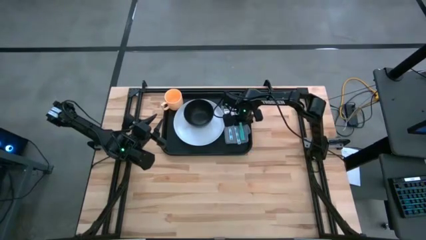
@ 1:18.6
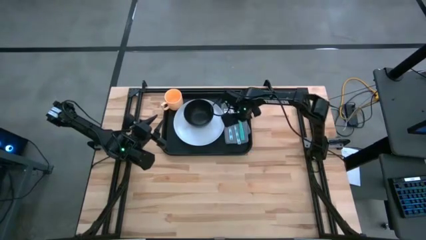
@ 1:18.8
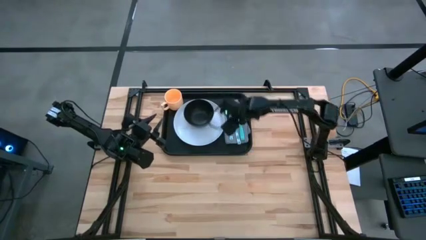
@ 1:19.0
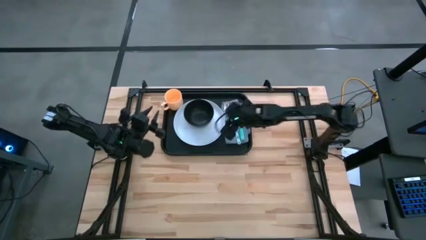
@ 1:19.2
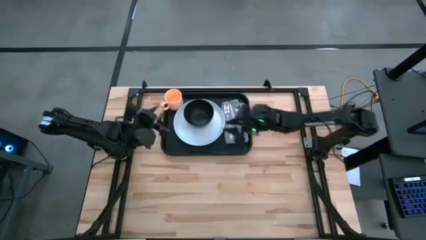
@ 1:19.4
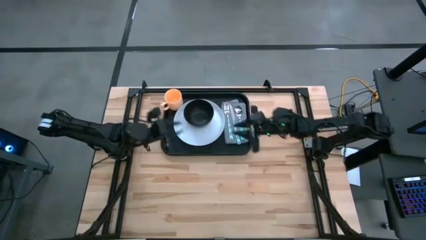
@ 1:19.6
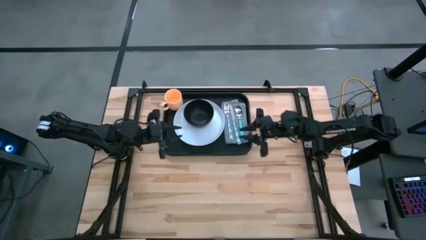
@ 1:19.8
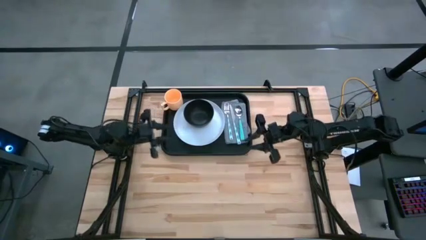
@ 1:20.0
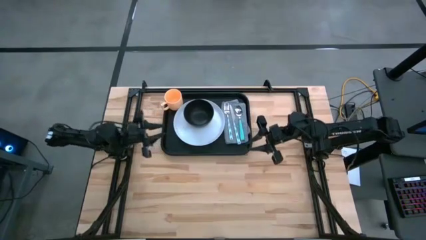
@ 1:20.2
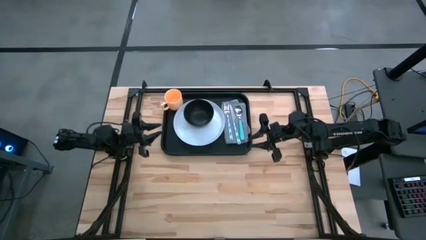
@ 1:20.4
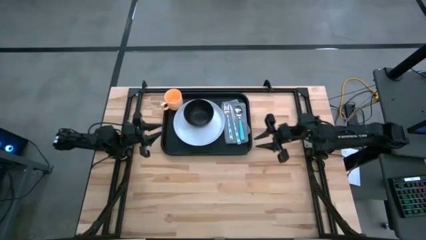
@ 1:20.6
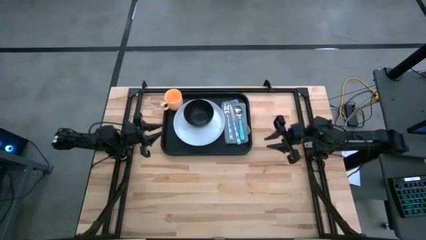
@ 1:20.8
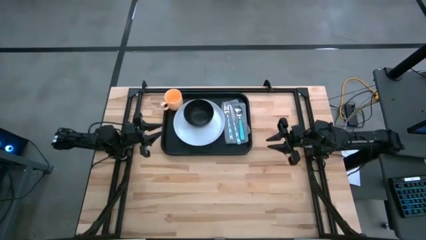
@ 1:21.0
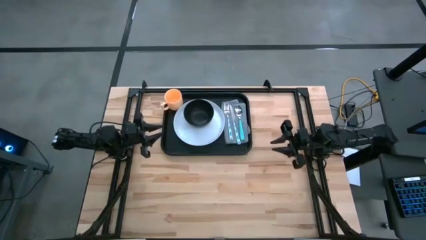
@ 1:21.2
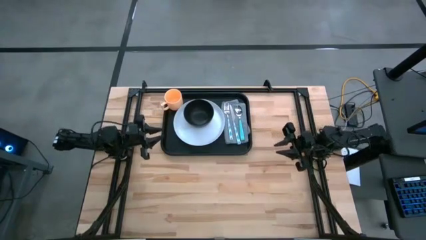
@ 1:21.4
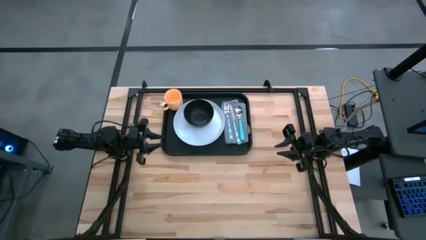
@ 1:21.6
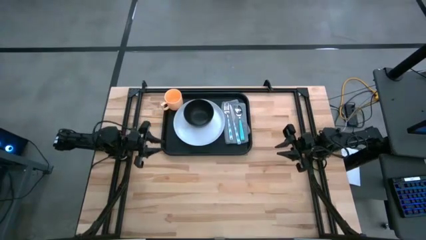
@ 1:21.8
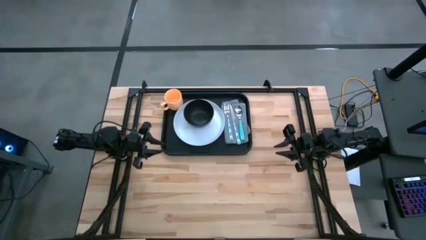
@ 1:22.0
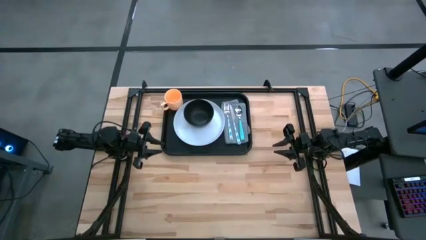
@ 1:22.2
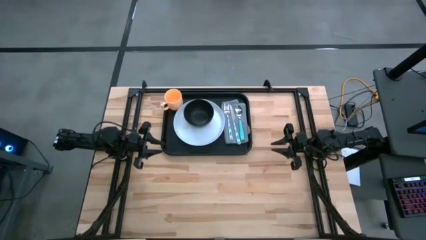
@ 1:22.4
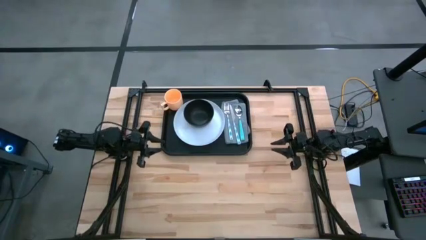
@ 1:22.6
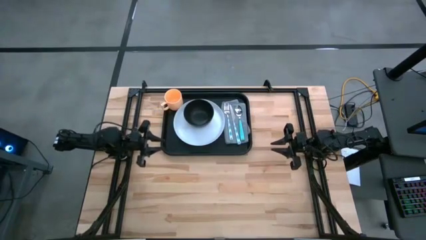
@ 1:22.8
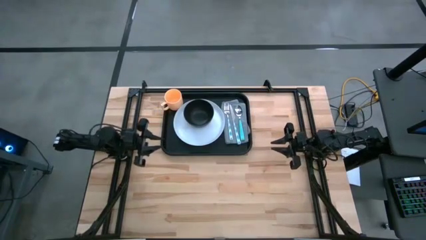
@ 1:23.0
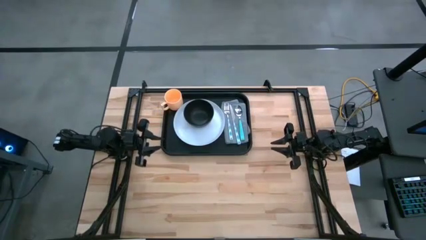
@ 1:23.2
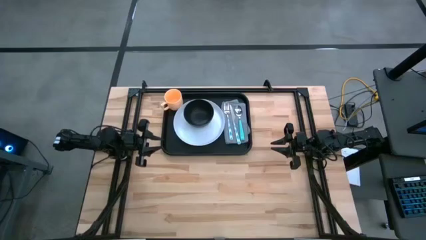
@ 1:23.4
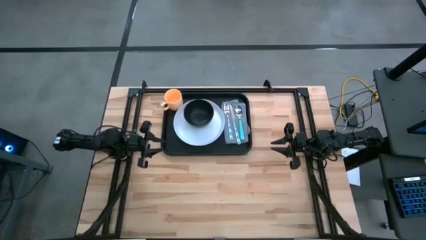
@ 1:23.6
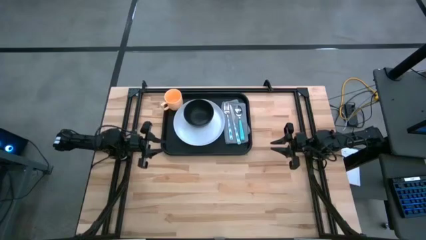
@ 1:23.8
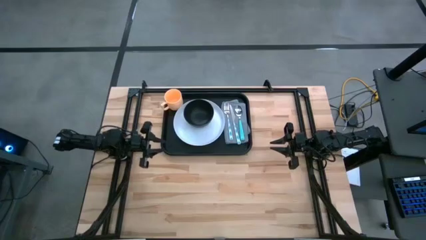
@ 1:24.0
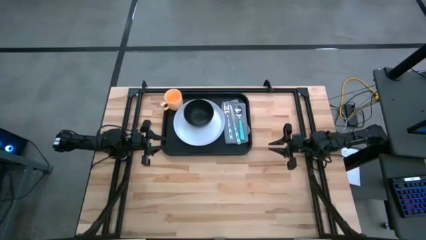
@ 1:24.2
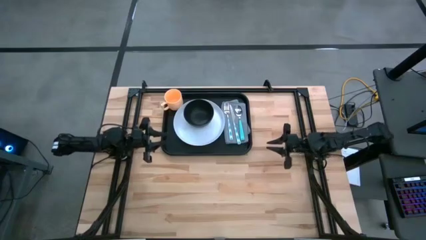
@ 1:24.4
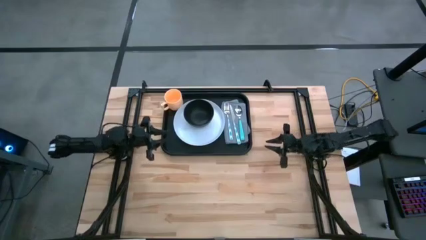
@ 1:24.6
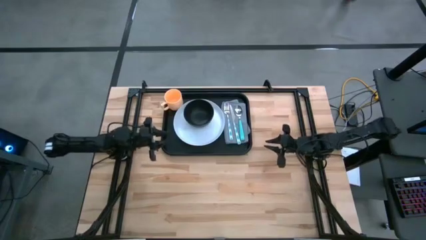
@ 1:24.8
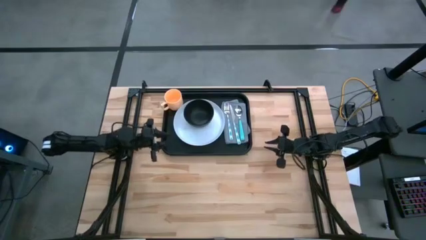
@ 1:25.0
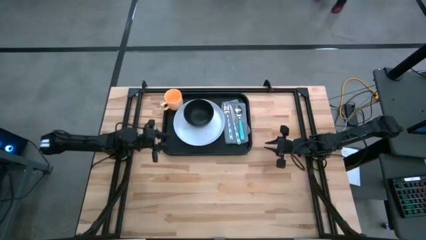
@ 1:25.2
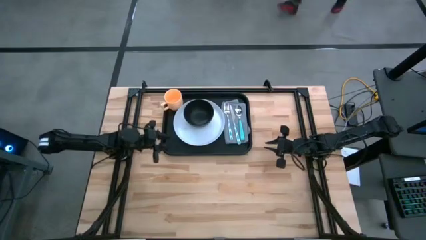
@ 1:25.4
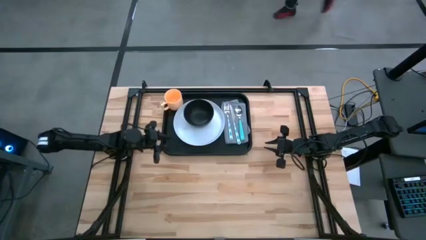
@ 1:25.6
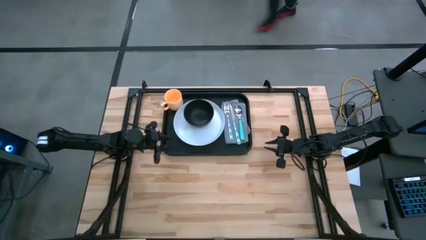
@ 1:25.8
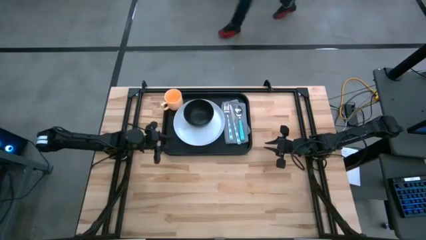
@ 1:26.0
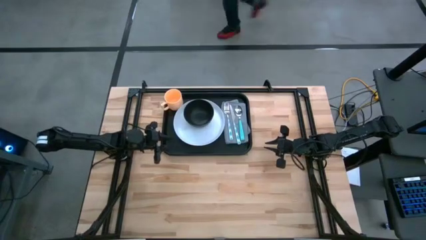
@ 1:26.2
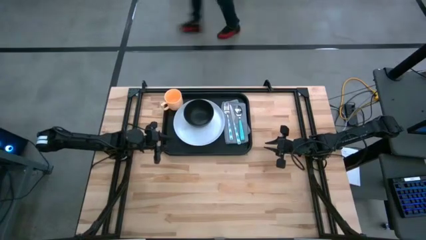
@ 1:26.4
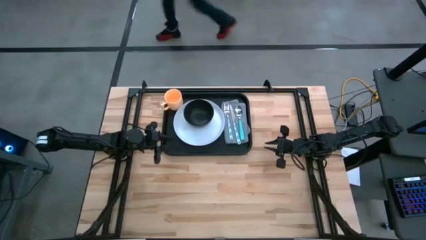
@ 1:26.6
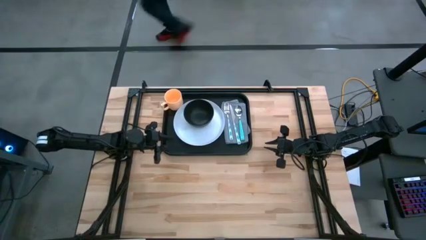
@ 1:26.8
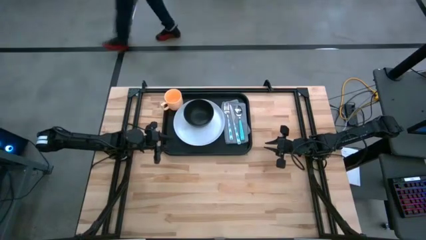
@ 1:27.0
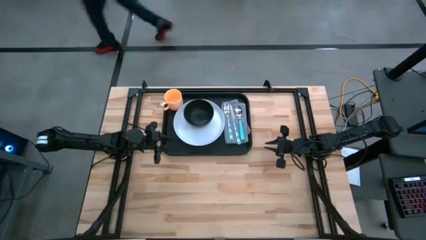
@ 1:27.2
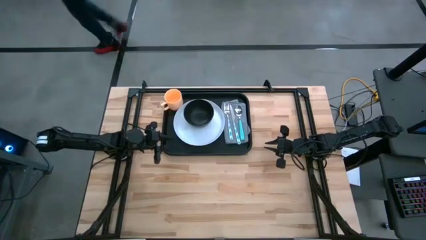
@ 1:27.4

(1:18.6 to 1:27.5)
Task: Set up tray
Return to Home Position

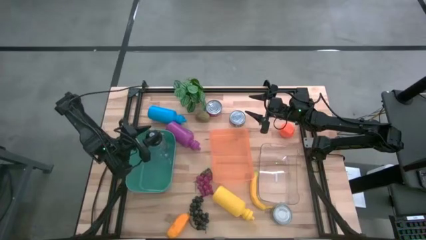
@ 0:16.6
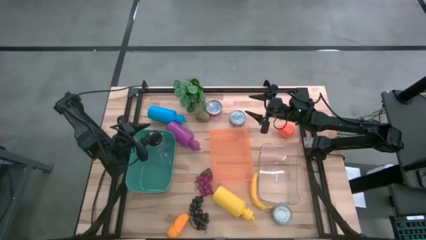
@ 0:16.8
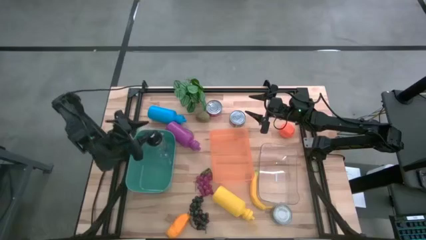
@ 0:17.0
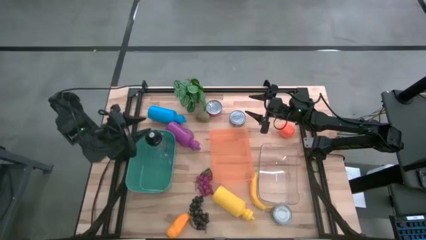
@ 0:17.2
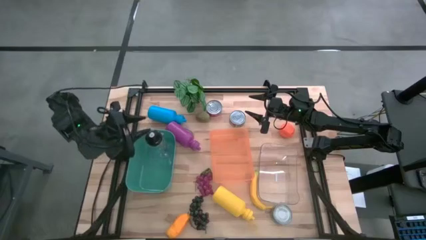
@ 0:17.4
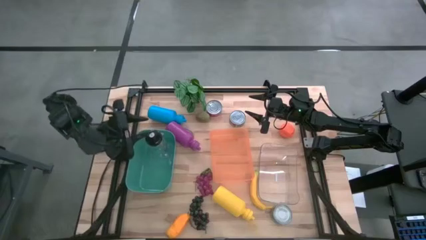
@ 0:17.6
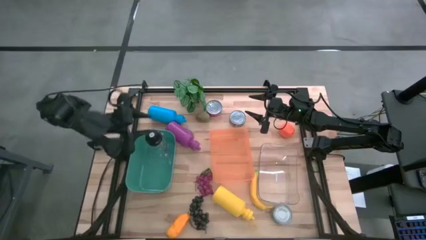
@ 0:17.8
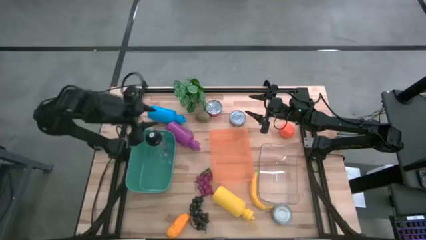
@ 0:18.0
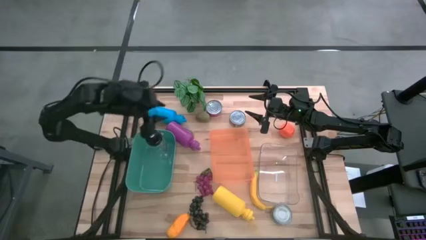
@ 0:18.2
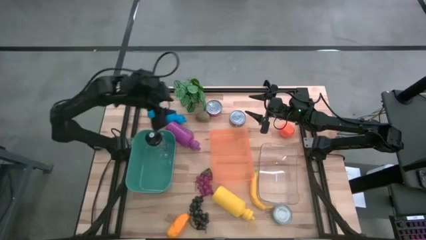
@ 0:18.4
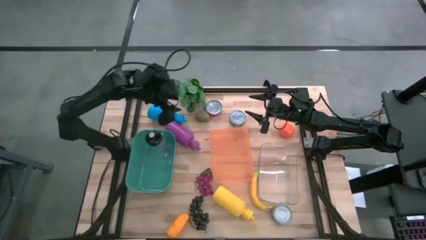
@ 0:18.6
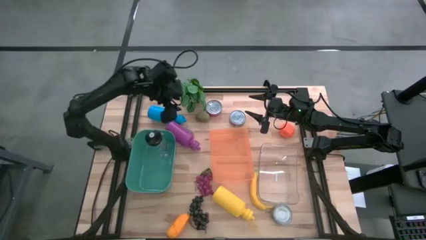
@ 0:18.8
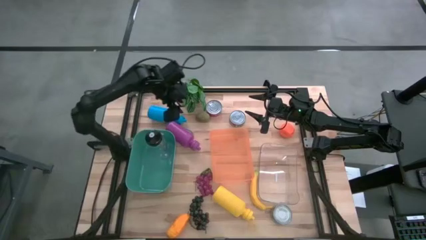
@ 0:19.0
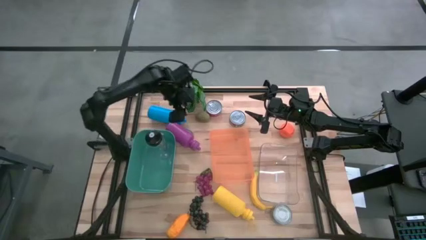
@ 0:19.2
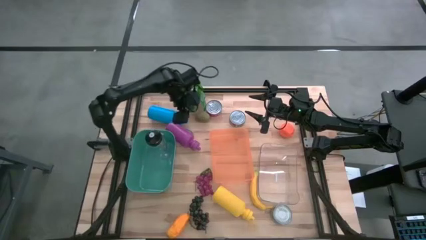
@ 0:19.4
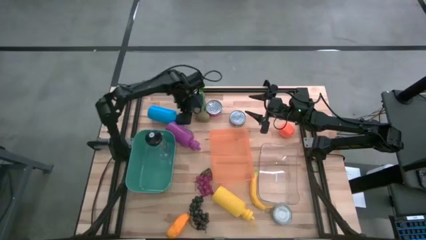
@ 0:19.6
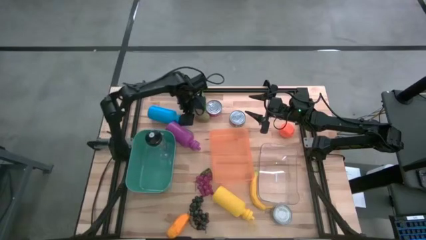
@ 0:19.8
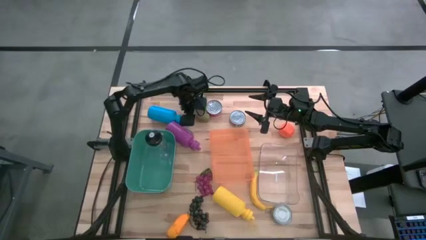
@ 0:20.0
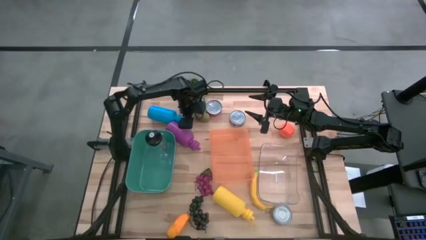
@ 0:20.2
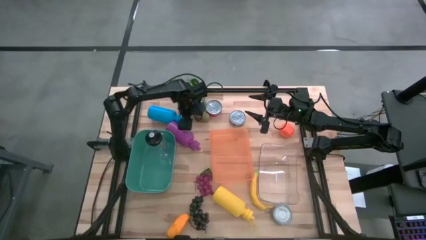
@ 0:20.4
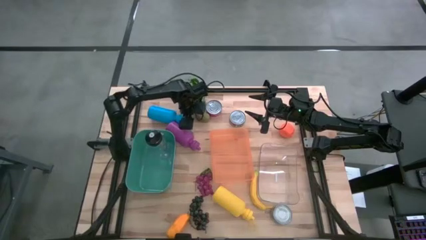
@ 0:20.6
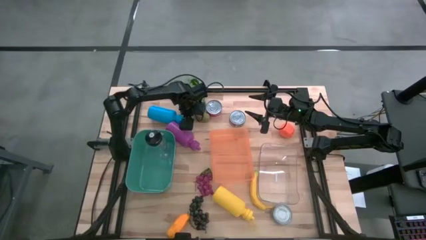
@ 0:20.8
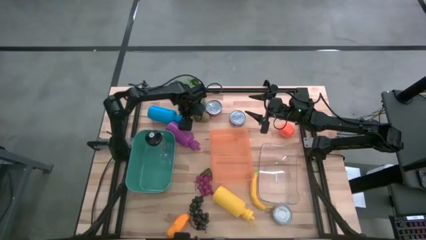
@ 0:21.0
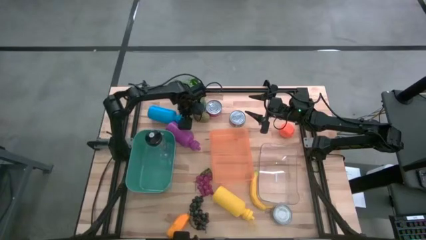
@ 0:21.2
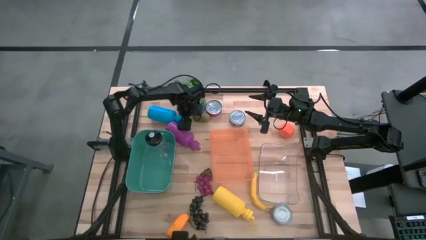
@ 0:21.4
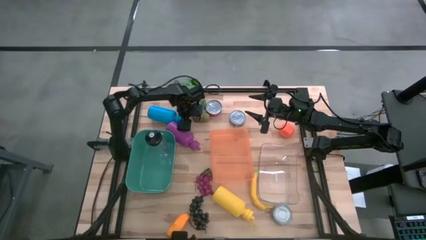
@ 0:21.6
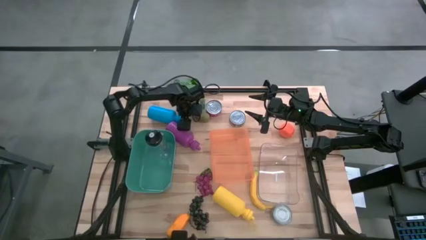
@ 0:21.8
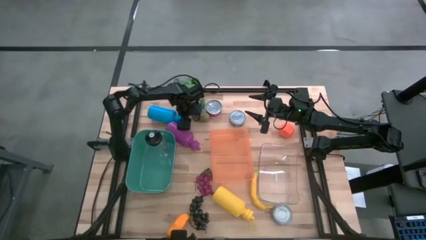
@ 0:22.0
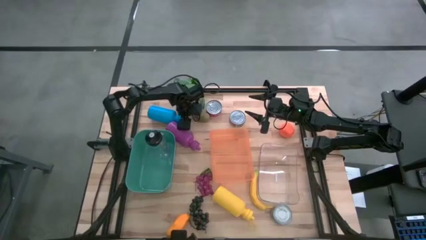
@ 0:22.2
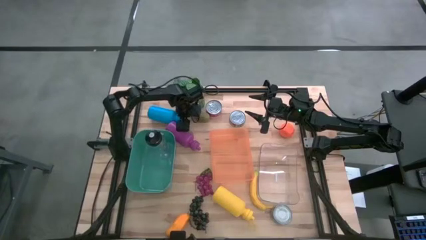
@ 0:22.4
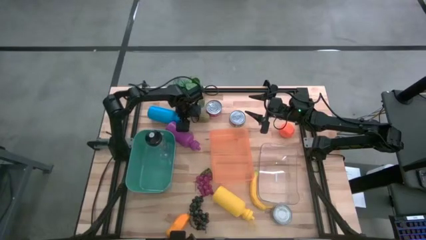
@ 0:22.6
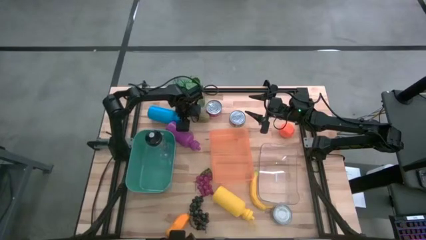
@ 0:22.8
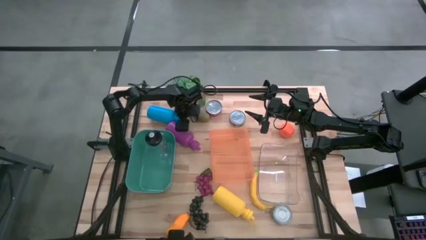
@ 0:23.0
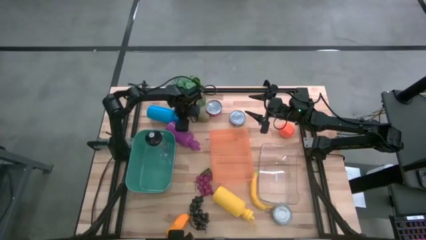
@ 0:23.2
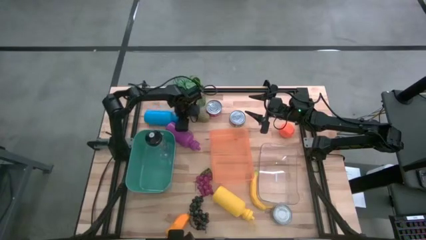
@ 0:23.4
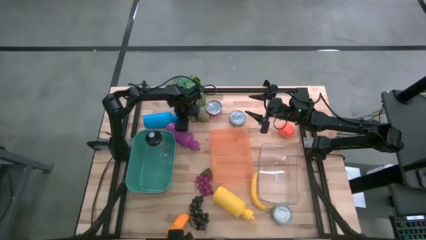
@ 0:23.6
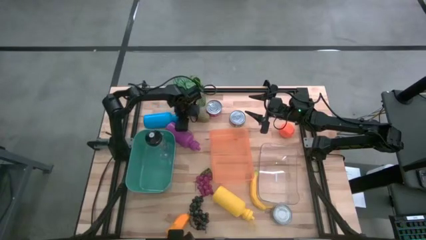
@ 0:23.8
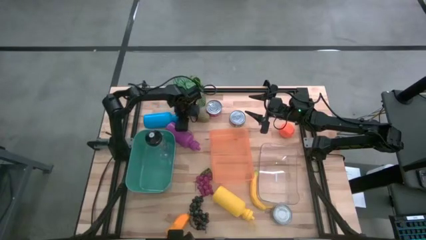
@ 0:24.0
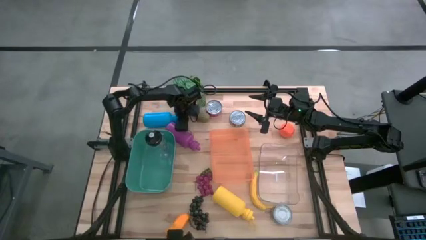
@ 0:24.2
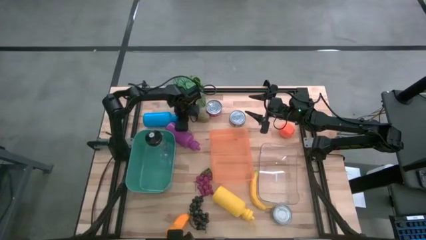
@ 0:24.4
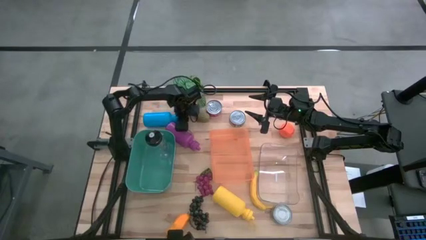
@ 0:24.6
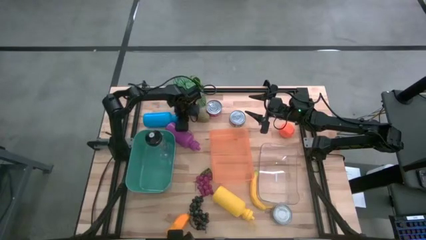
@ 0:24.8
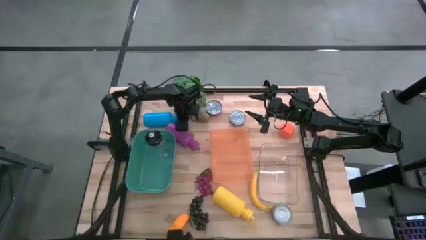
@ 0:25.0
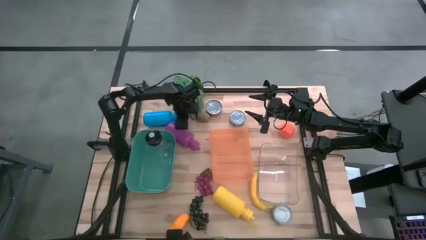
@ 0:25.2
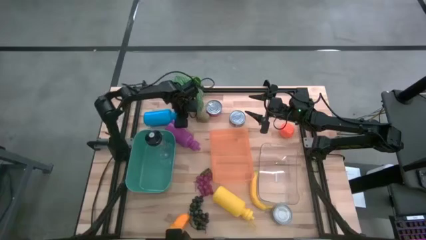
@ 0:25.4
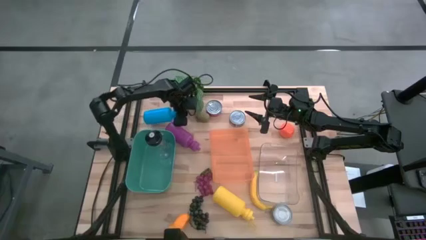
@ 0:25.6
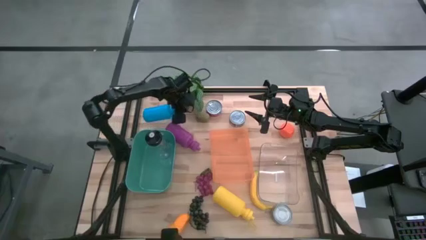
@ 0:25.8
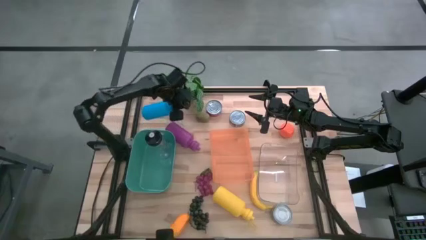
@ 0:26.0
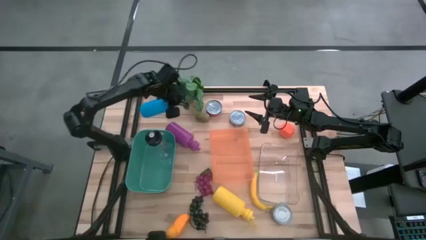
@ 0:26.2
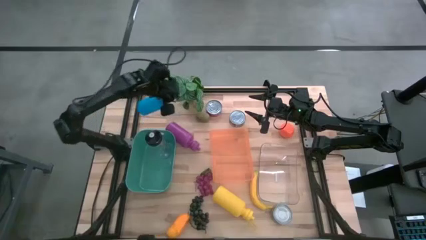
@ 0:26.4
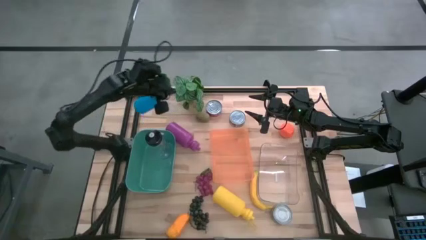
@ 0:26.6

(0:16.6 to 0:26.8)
Task: Pick & Place Food Item
Put the blue water bottle into the green bin
